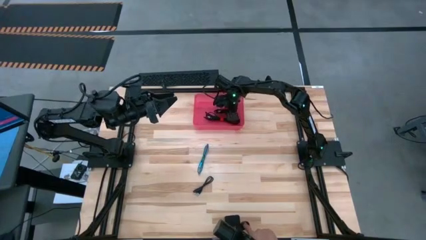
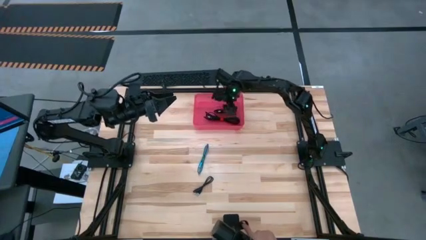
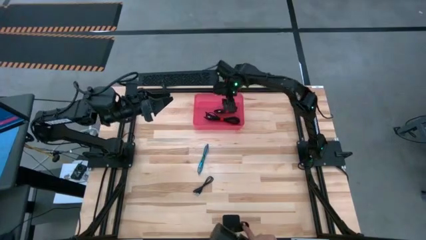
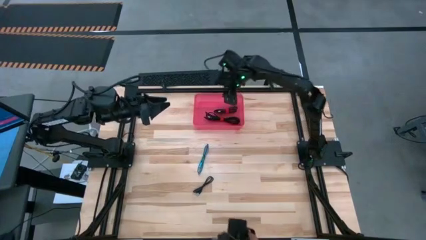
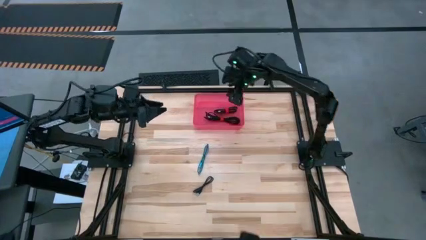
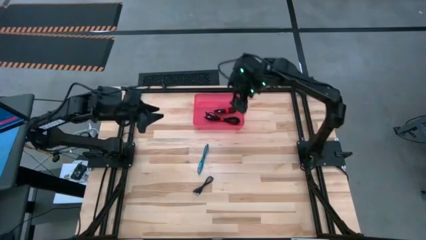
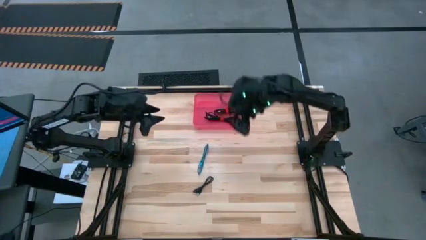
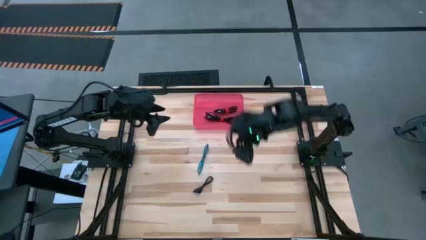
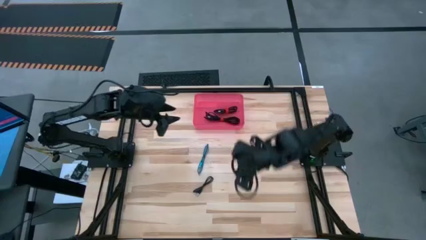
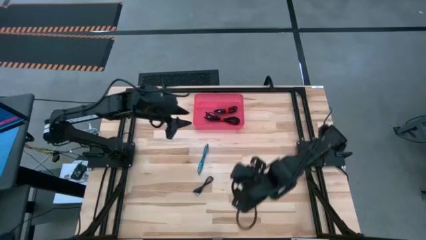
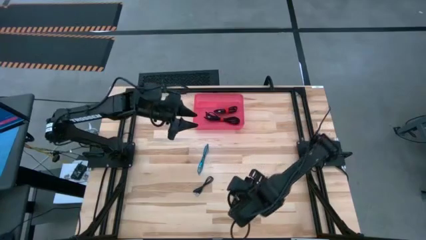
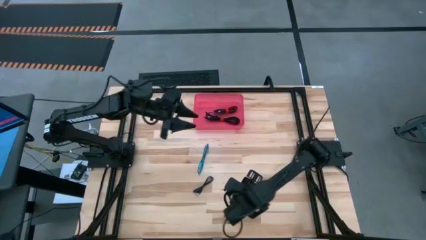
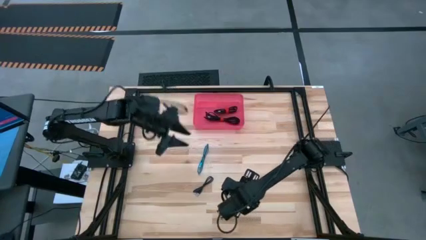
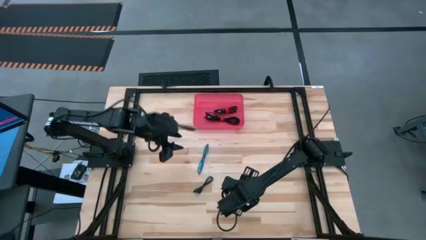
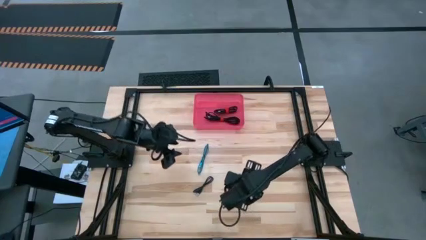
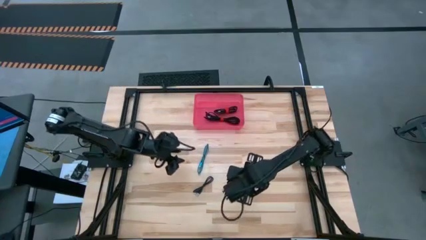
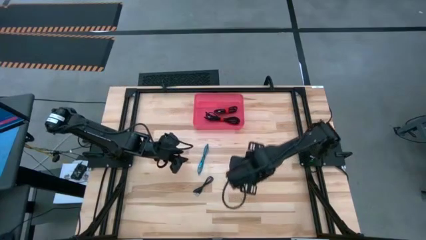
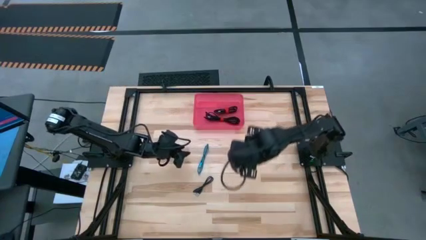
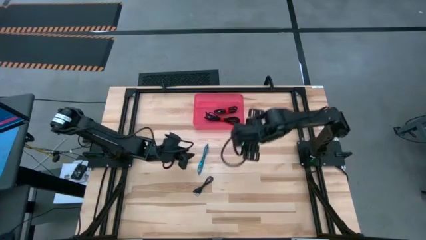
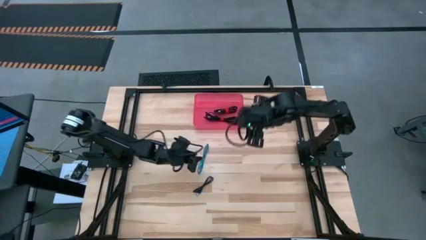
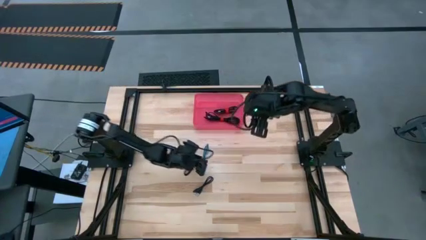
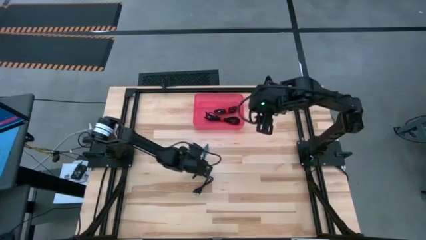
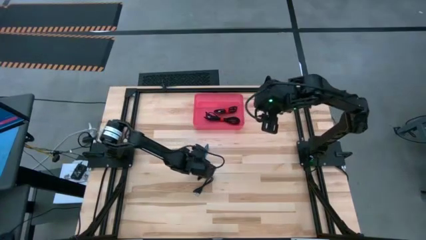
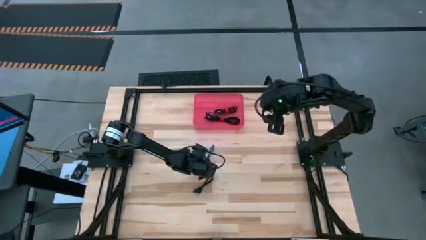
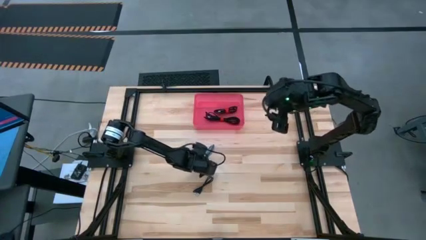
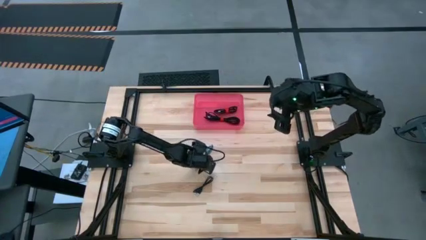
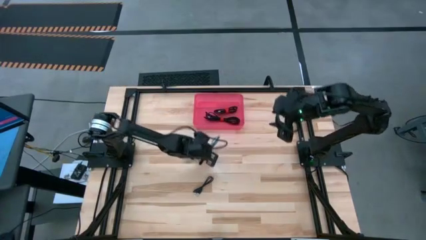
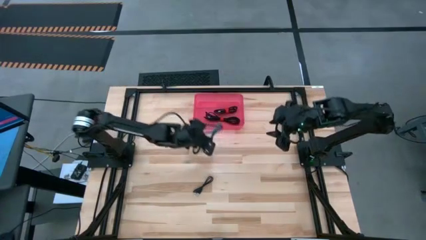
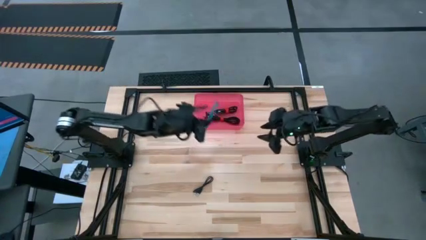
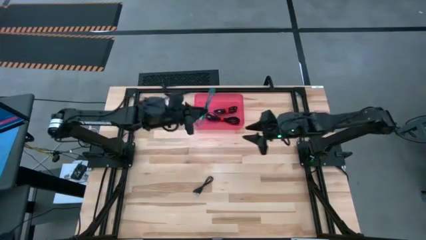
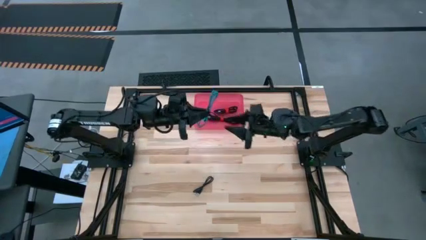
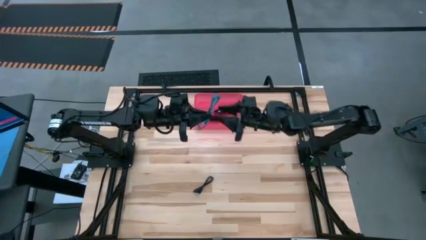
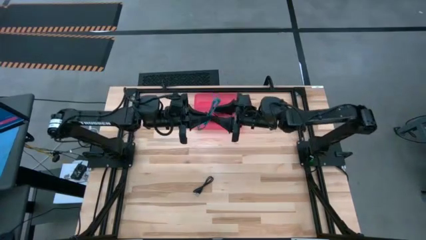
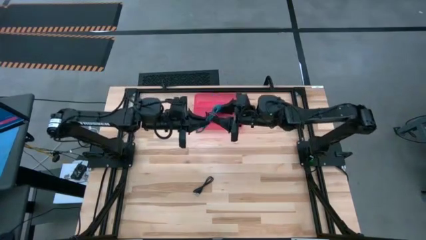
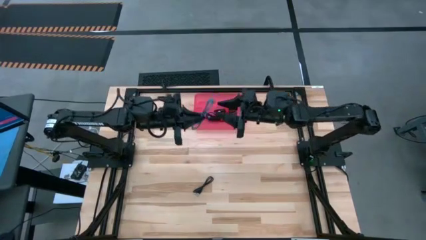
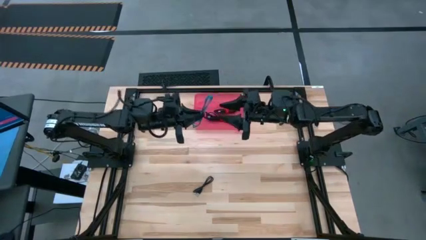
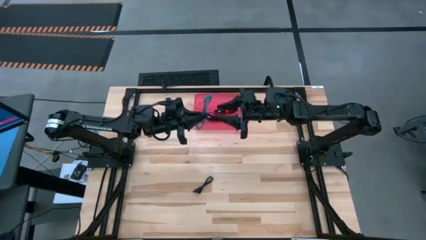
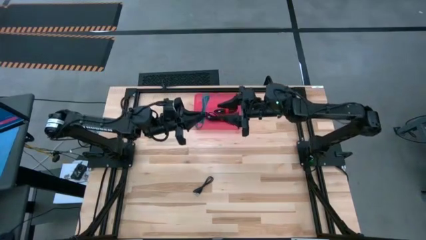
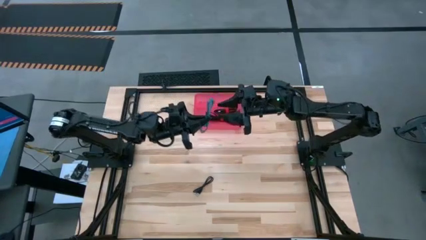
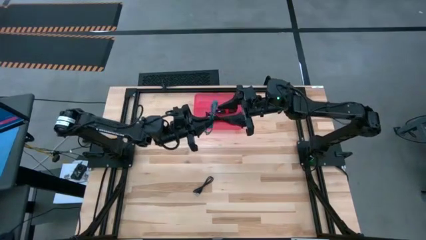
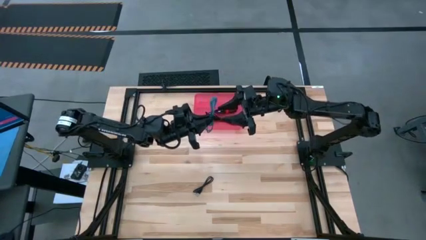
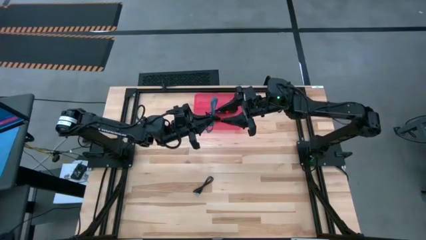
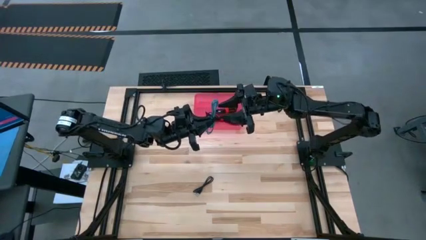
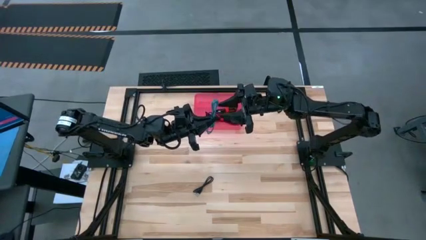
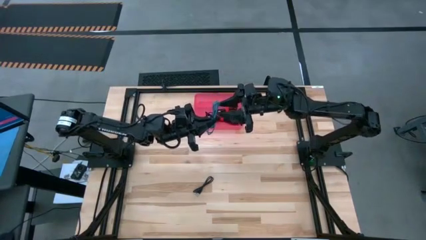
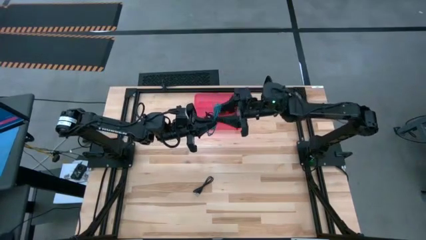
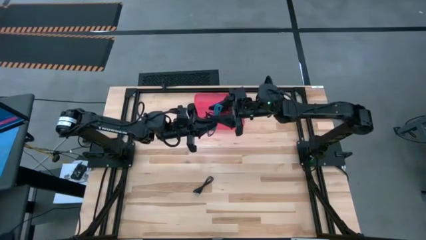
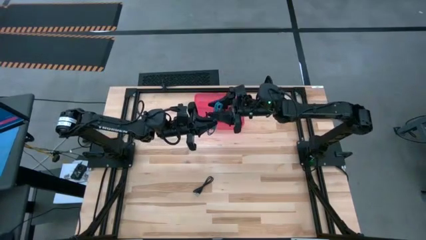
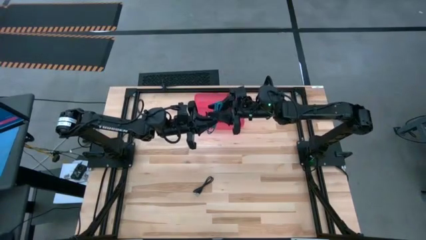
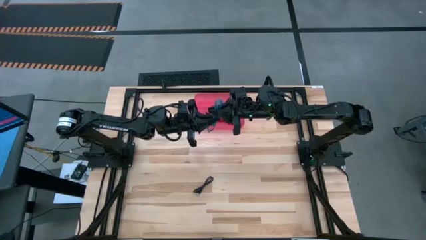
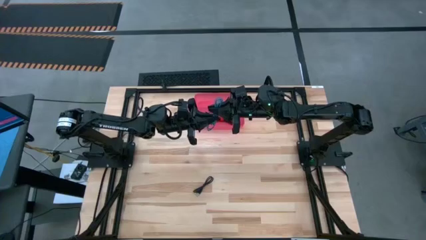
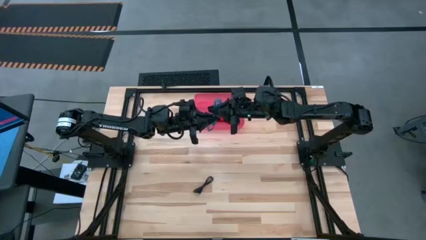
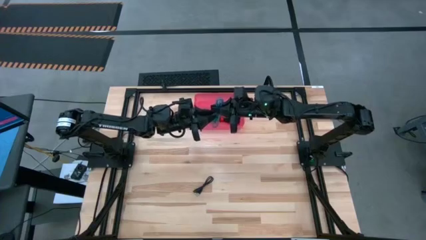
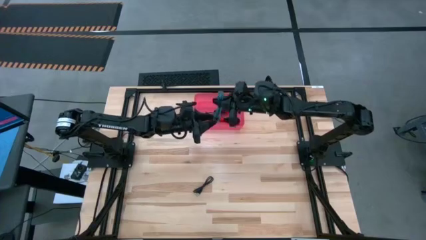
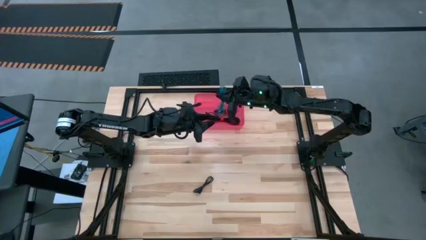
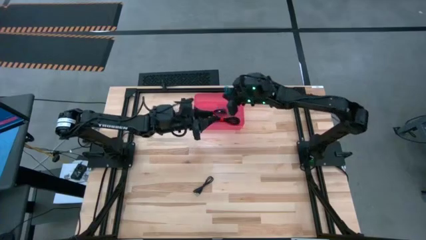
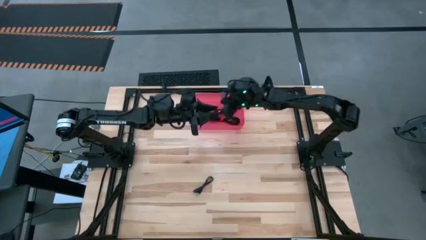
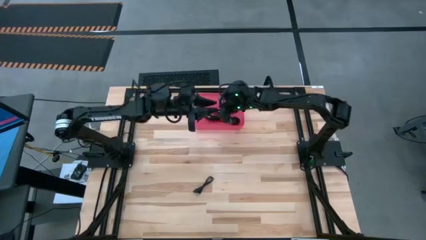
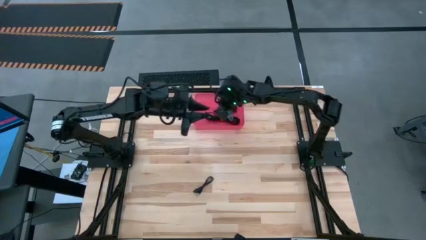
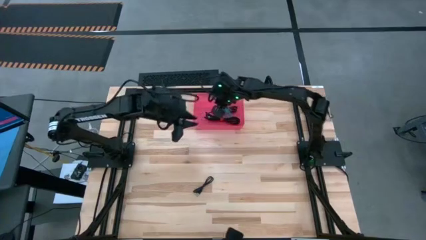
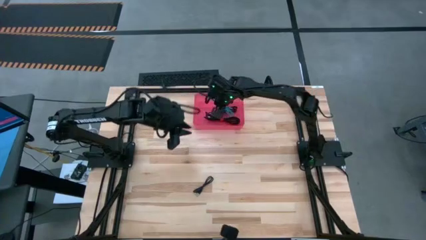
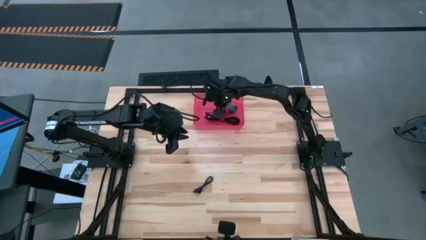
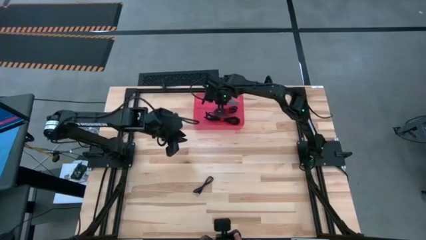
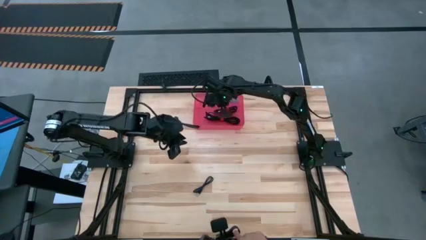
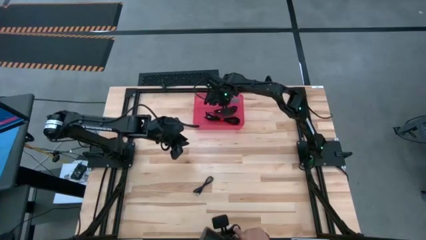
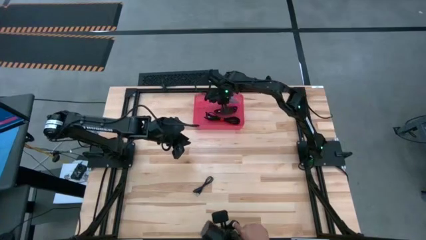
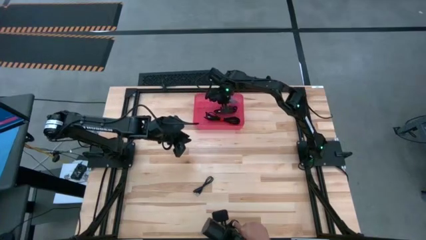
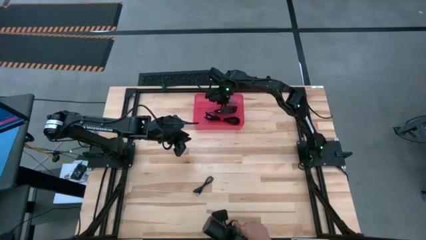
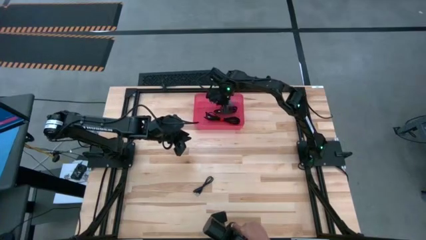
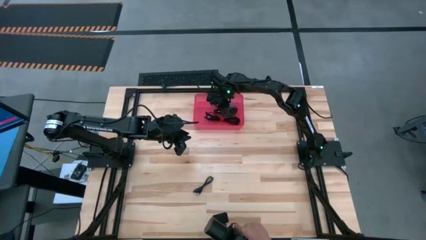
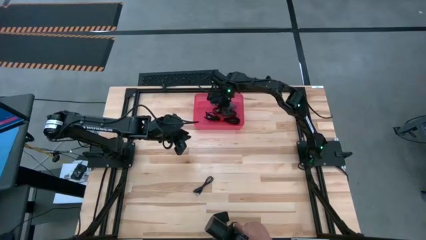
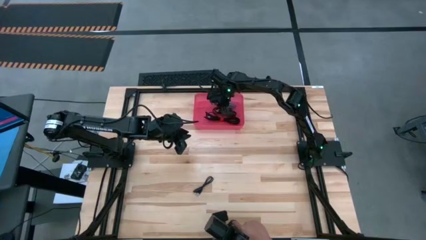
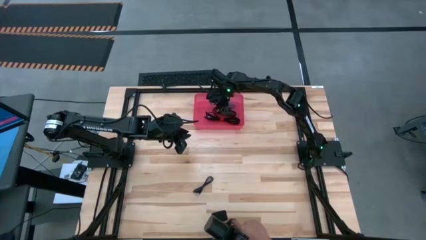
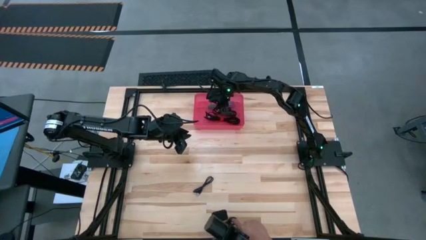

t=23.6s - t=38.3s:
Task: Pick and place USB-C Cables
Put the blue charger cable into the pink bin

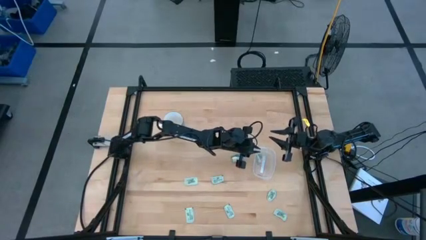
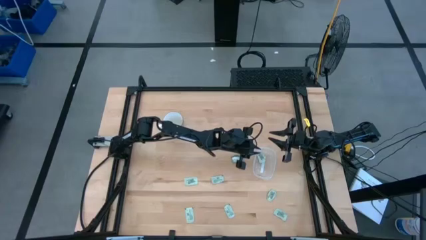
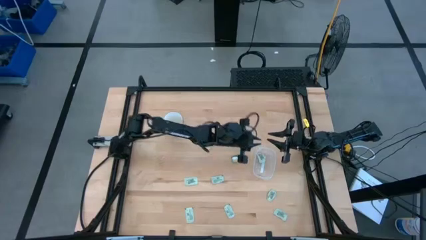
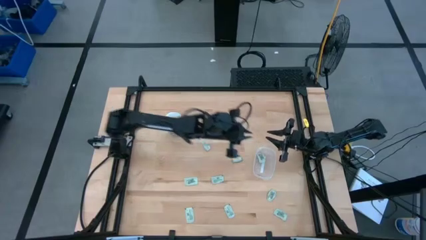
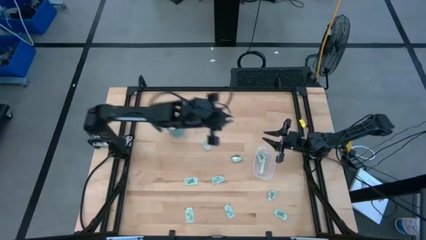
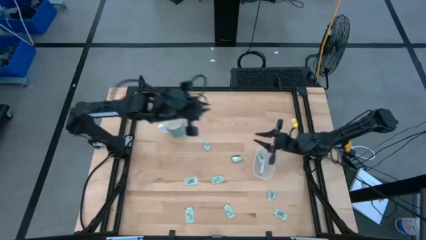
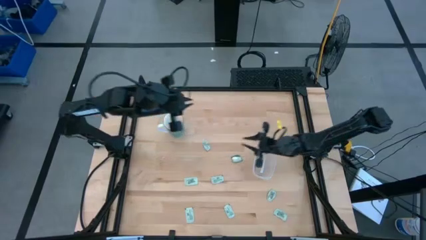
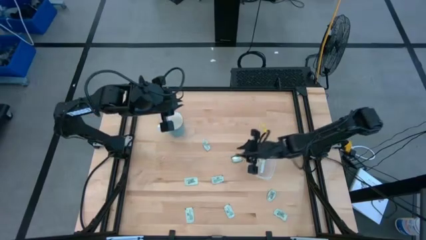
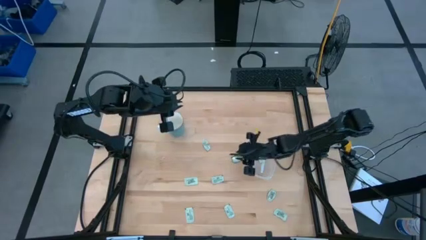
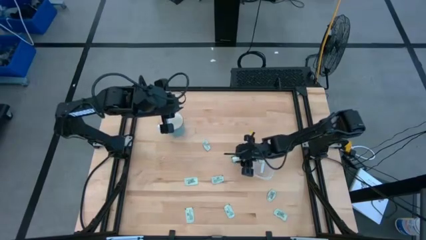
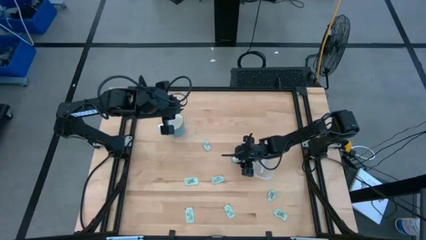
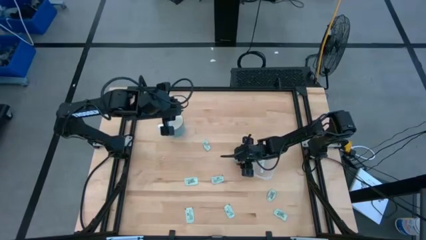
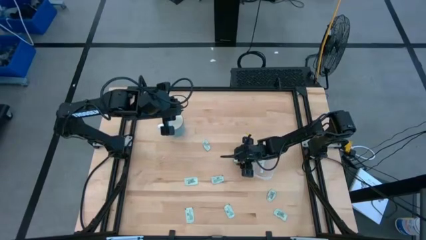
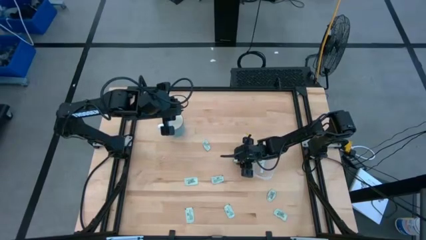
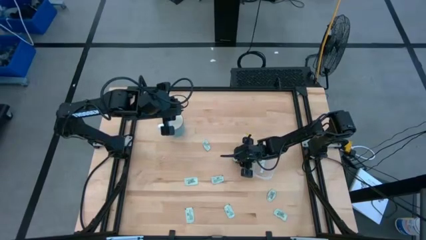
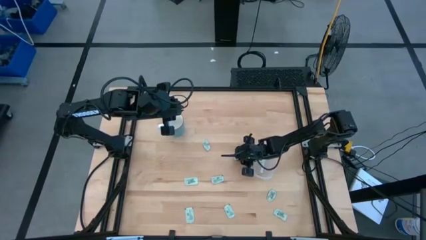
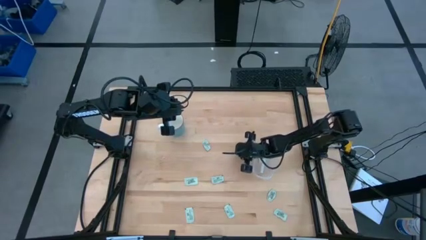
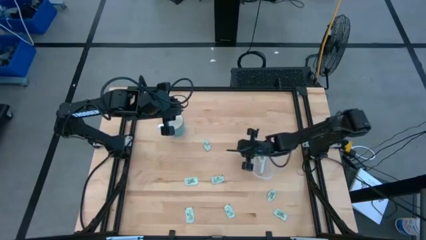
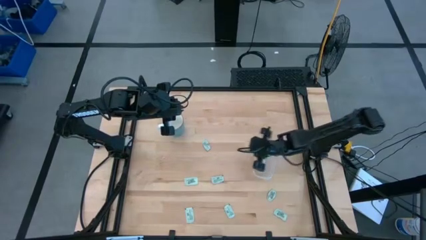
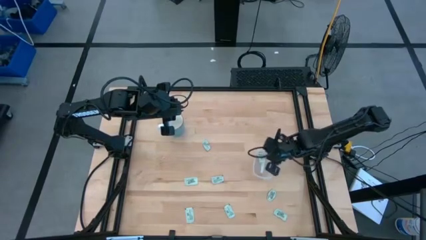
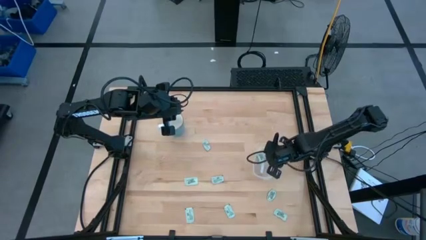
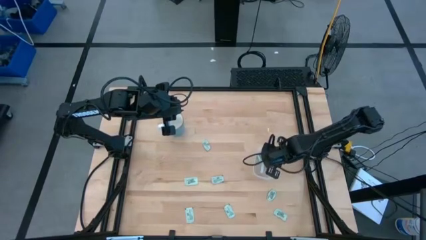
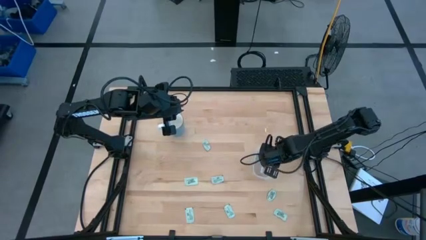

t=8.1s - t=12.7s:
Task: Pick and place Stevia / Truvia into bins
Put the white stevia packet into the container
